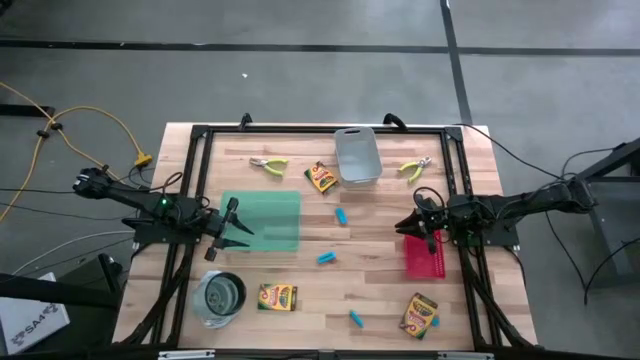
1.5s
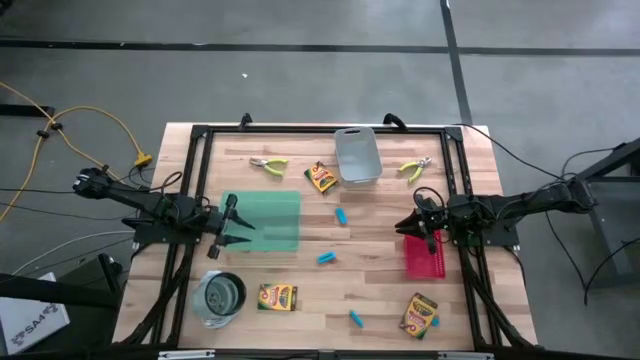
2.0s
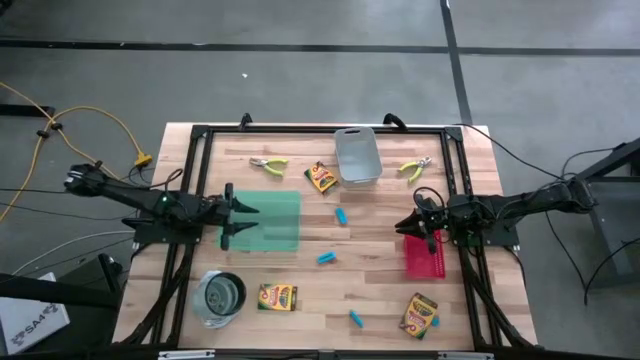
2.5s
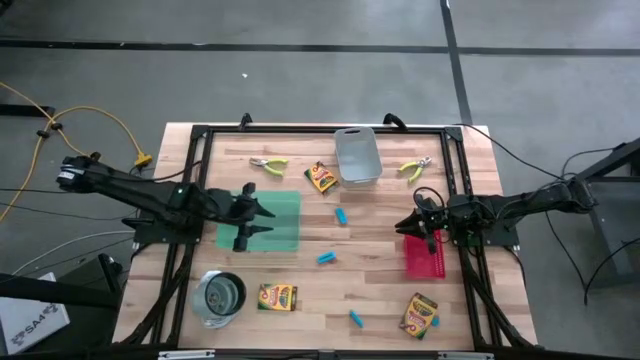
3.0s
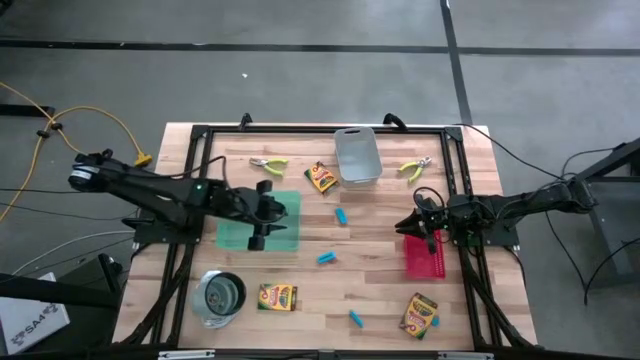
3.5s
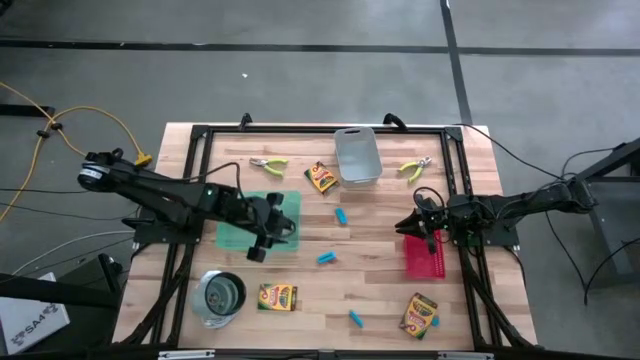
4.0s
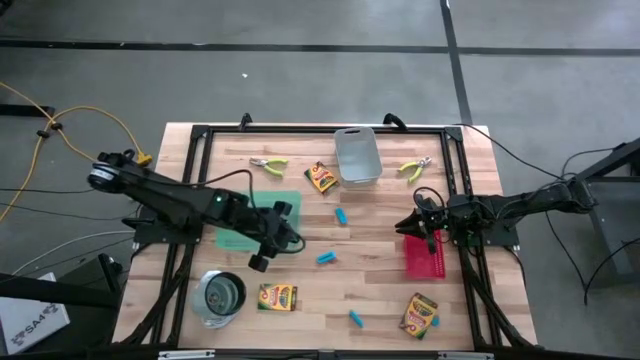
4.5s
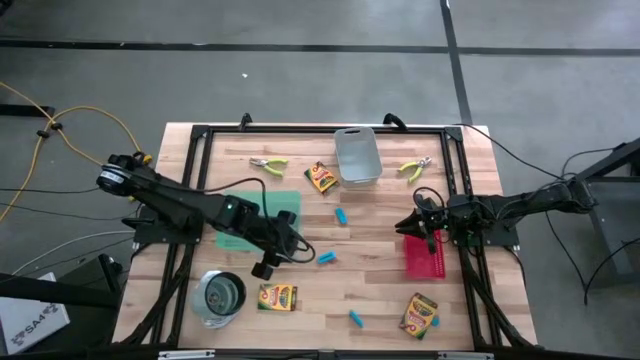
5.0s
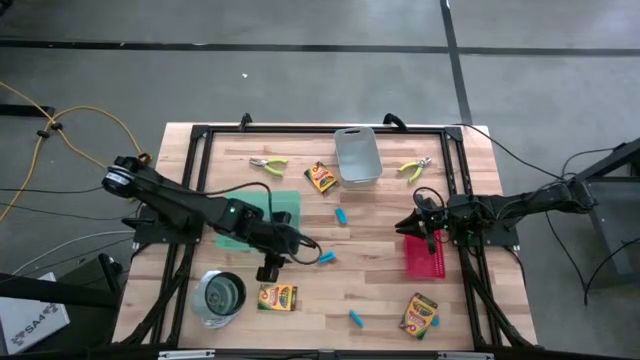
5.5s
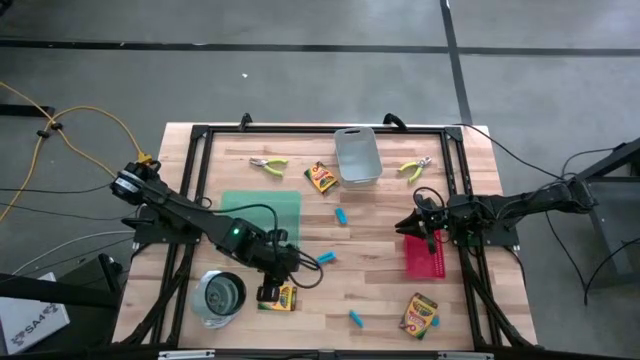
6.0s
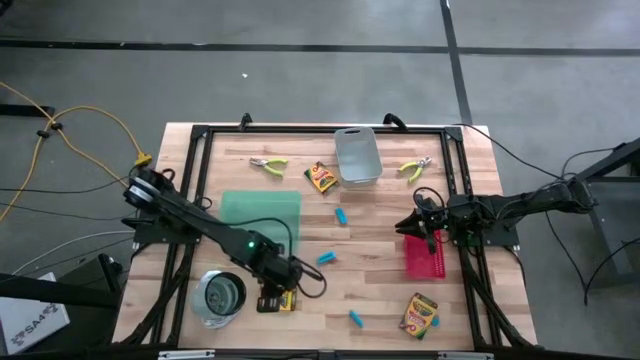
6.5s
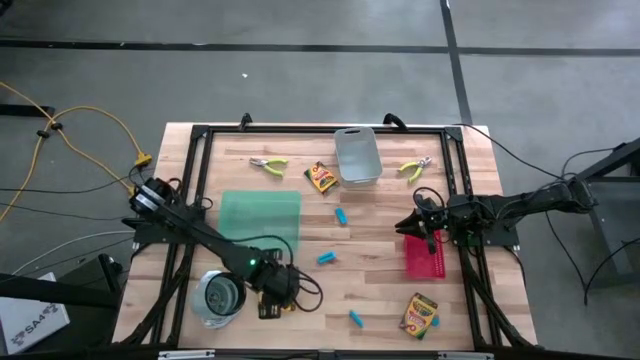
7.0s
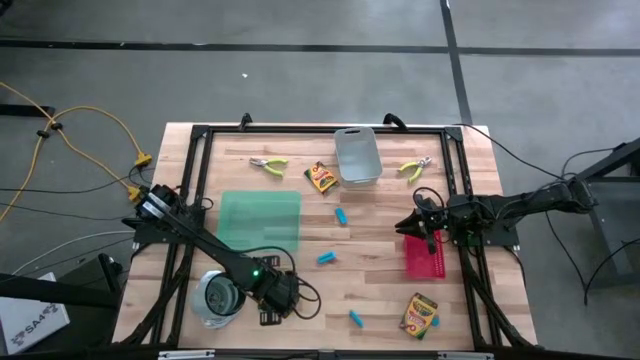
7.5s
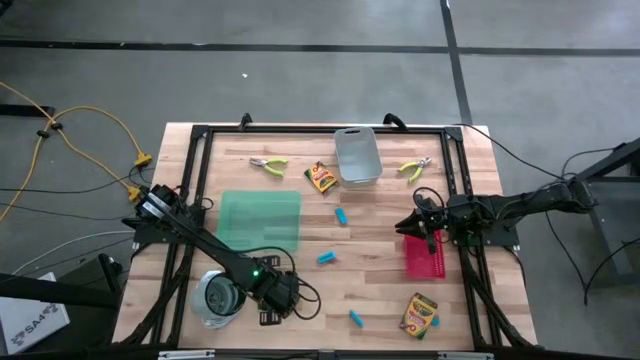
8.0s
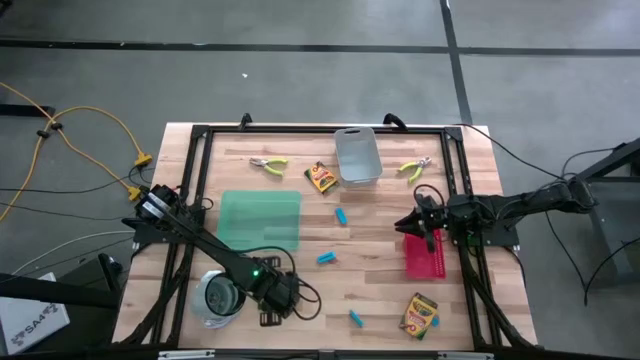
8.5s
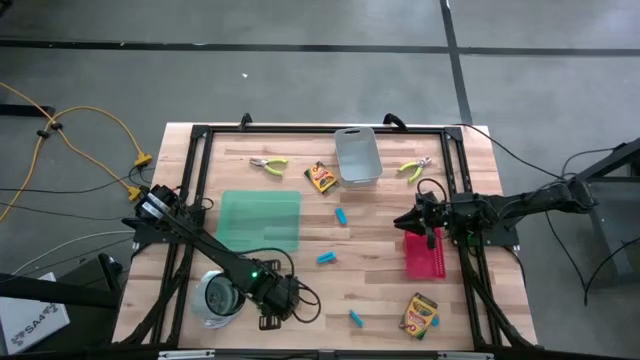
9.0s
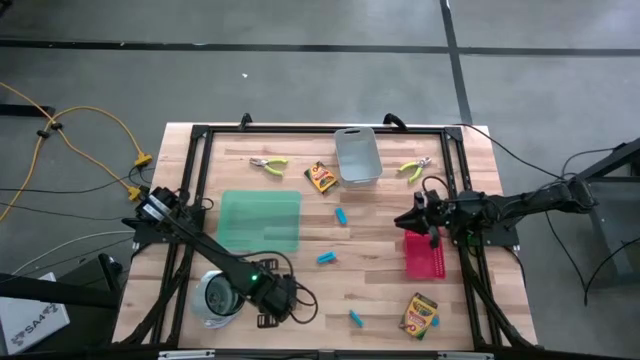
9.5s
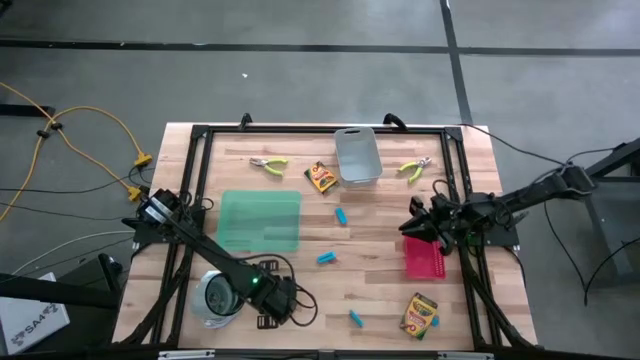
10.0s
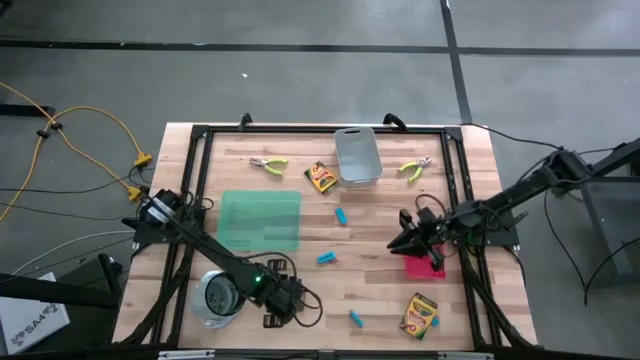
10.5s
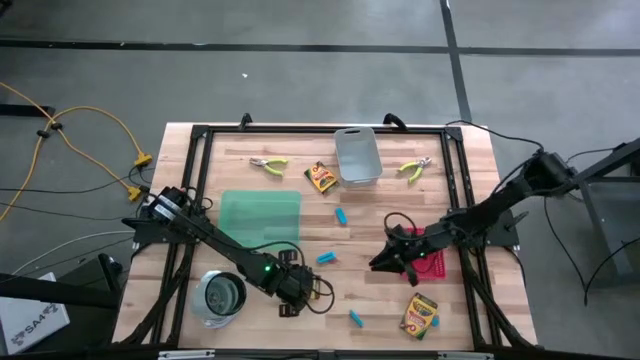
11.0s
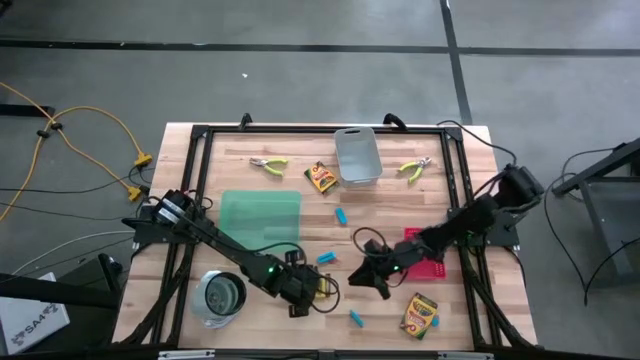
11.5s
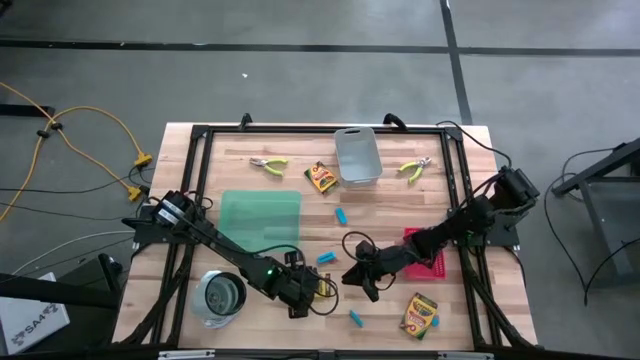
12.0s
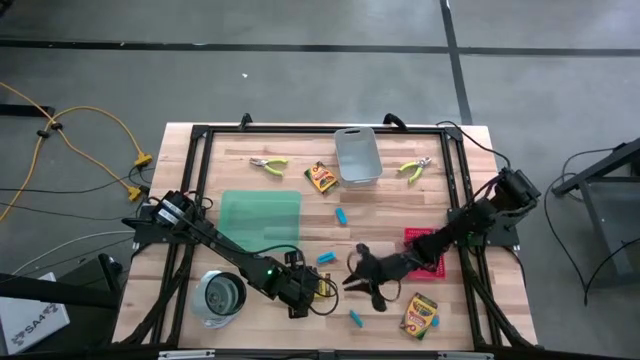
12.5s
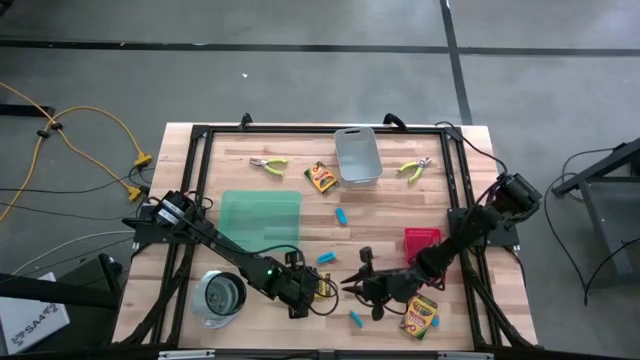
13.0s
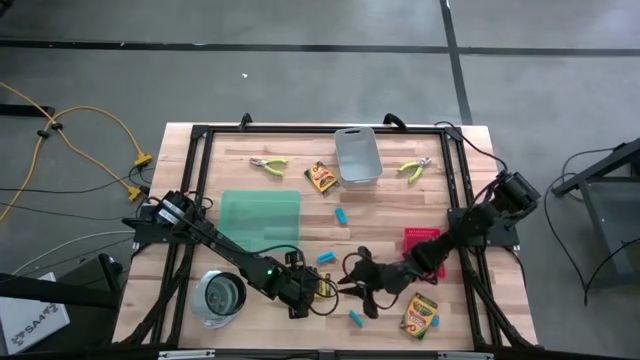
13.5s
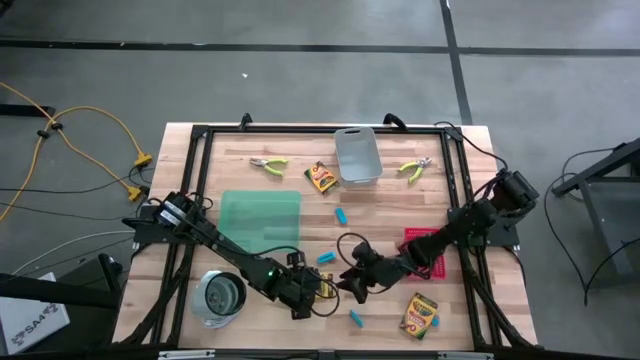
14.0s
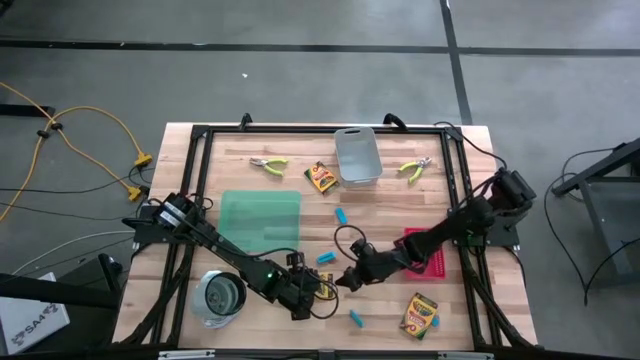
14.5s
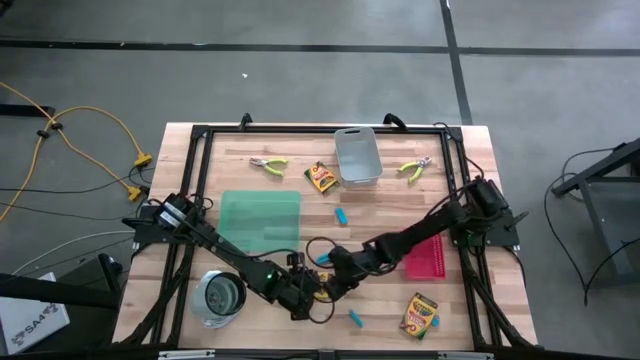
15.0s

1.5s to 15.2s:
Task: Pick & Place School Supplies
Put the crayon box into the green bin

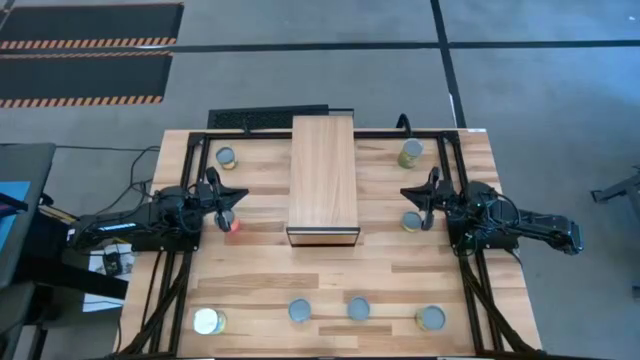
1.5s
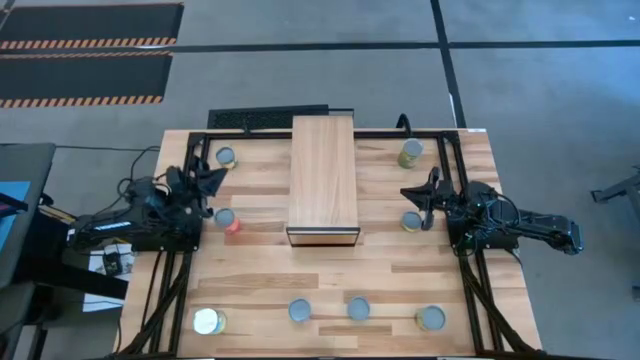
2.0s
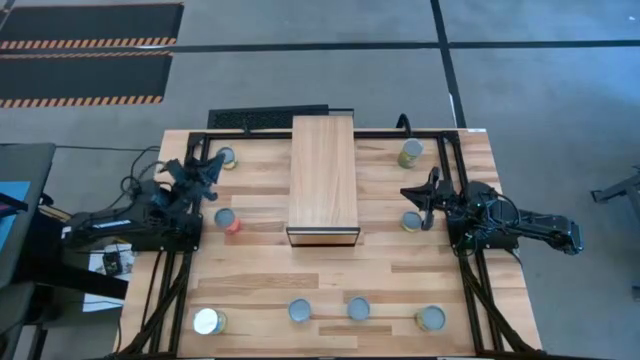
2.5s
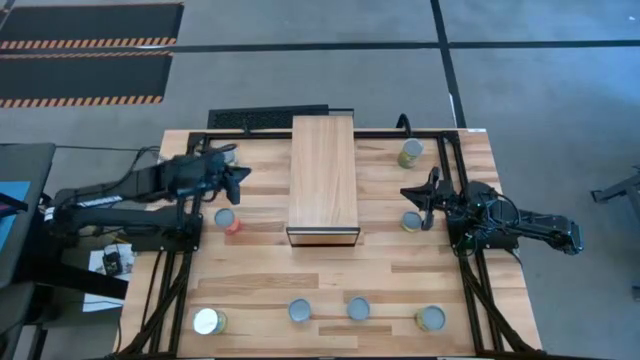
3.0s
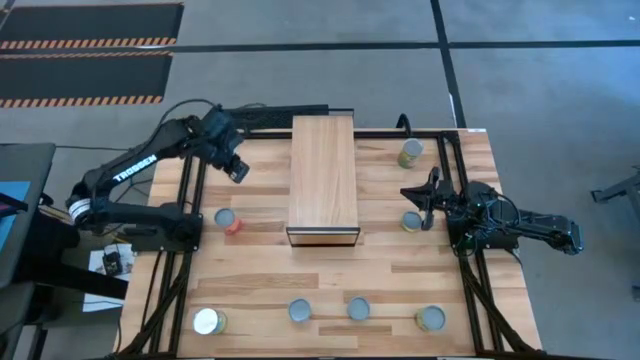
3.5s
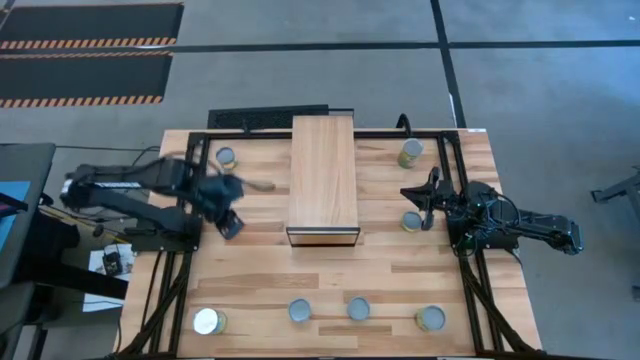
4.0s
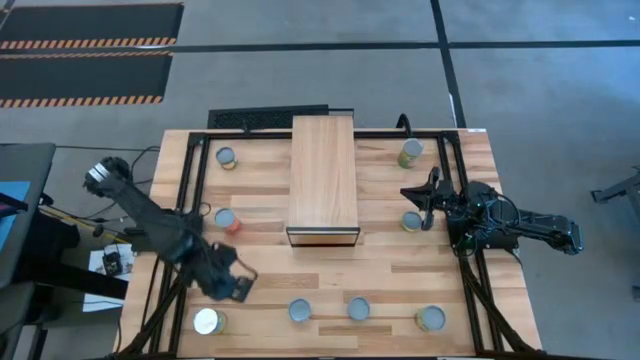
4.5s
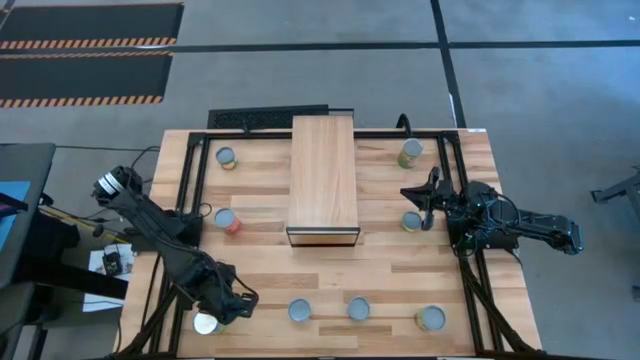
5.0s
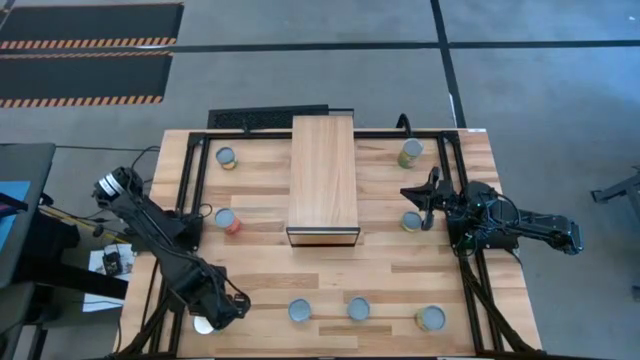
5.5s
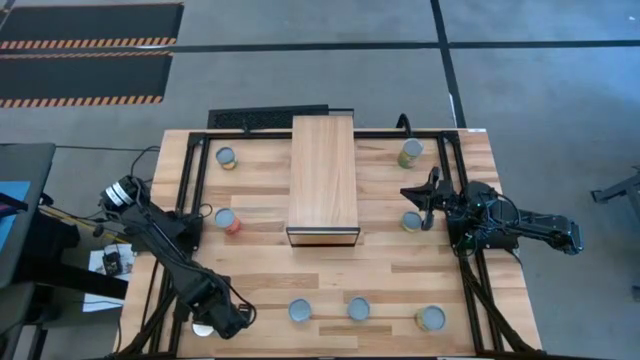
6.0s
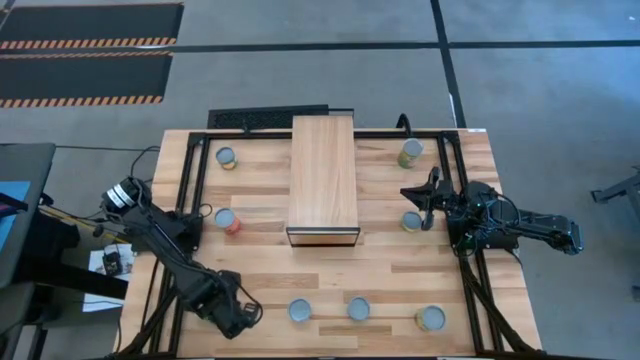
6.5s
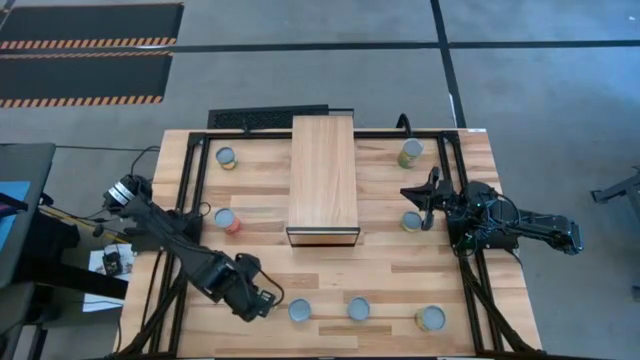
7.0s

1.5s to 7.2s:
Task: Pick and place cans onto a shelf
Put canned carrots on the shelf
